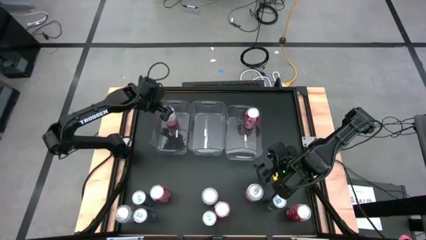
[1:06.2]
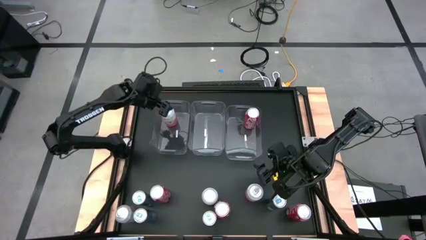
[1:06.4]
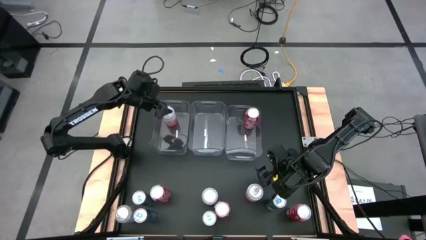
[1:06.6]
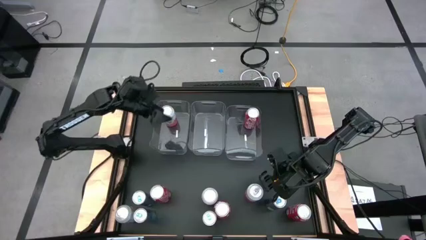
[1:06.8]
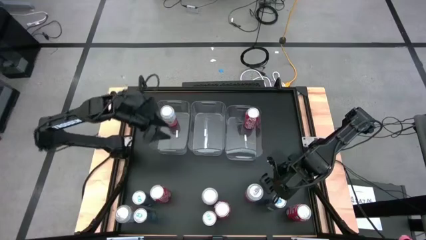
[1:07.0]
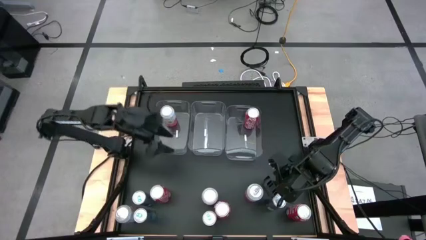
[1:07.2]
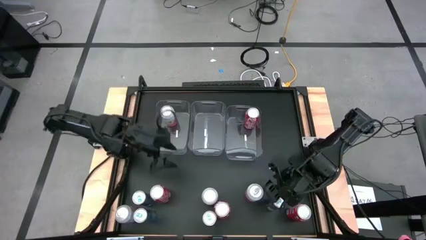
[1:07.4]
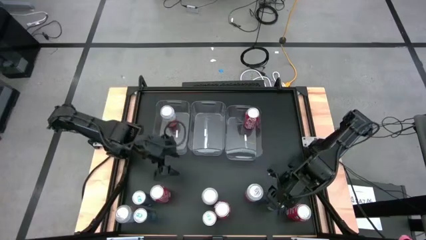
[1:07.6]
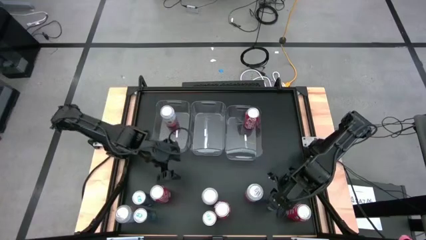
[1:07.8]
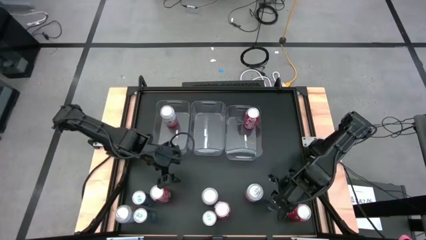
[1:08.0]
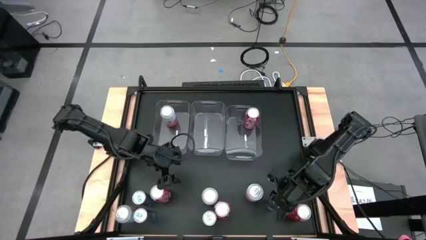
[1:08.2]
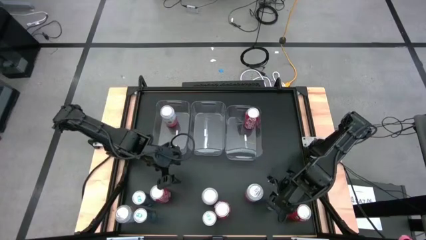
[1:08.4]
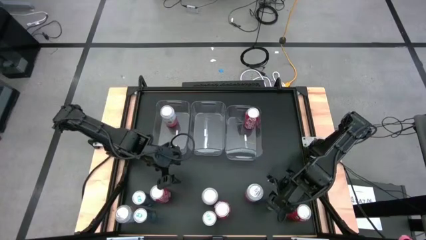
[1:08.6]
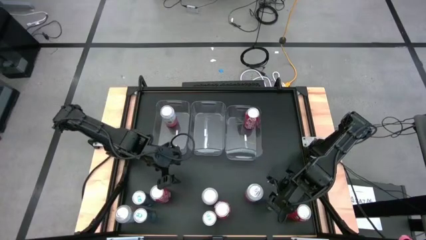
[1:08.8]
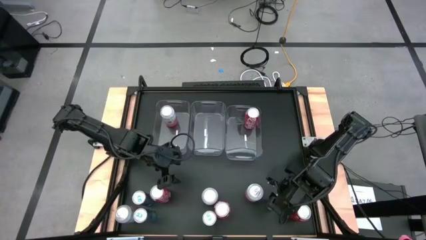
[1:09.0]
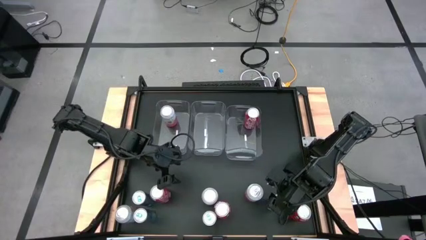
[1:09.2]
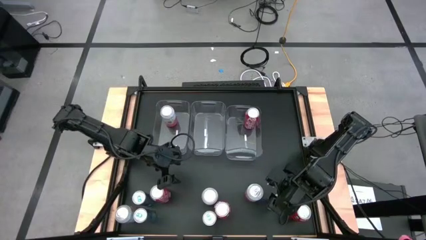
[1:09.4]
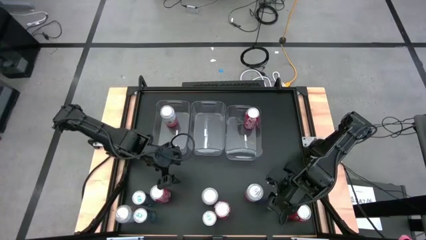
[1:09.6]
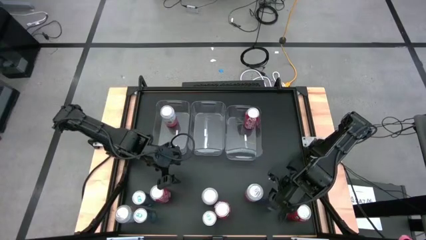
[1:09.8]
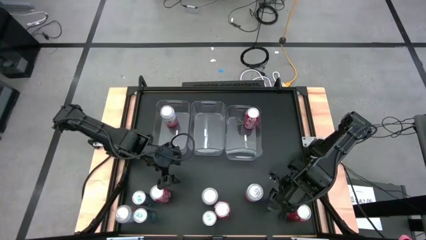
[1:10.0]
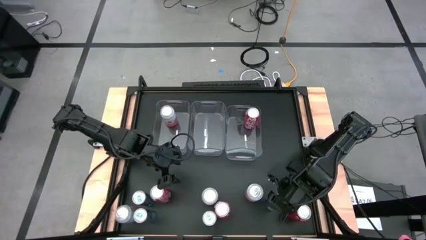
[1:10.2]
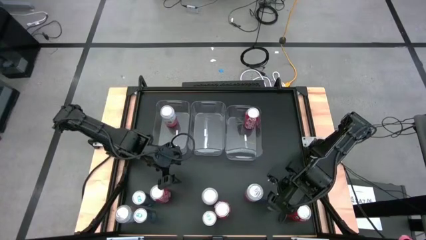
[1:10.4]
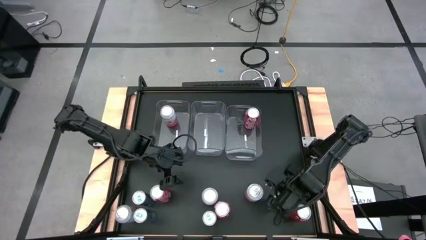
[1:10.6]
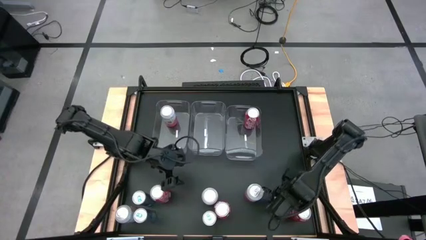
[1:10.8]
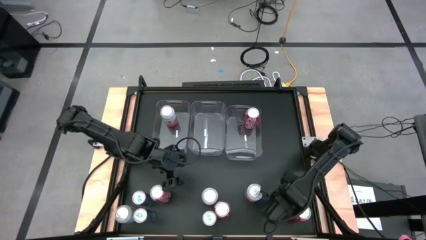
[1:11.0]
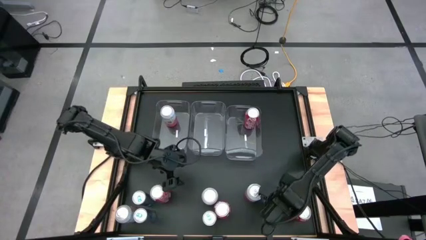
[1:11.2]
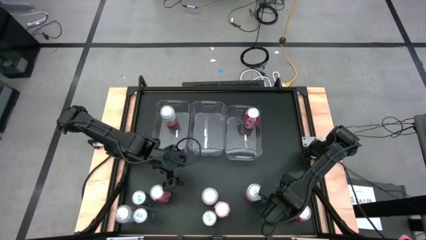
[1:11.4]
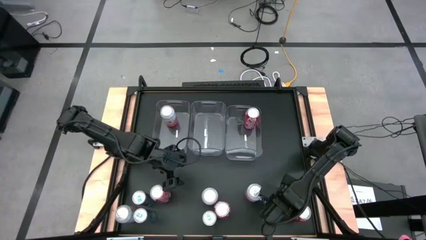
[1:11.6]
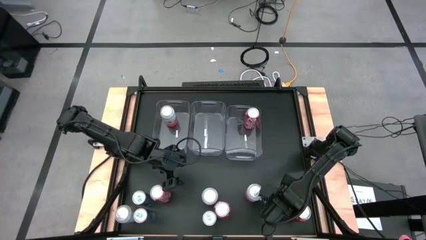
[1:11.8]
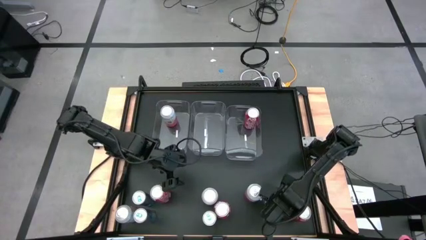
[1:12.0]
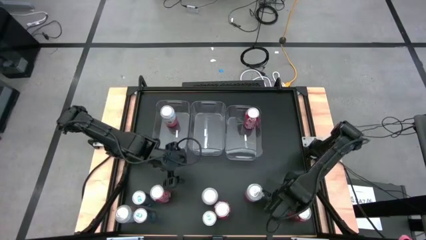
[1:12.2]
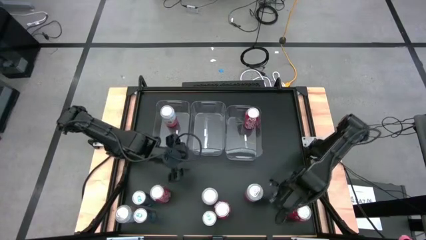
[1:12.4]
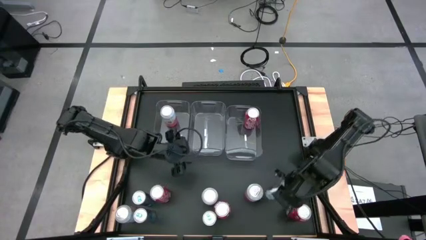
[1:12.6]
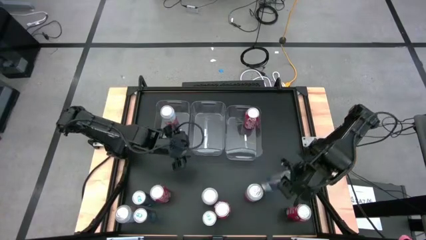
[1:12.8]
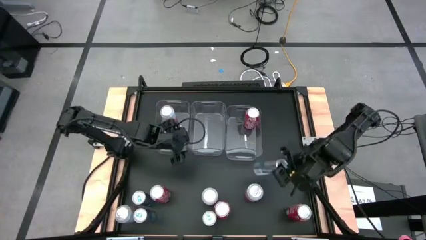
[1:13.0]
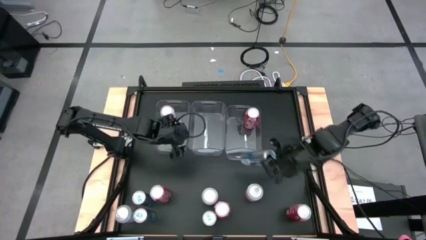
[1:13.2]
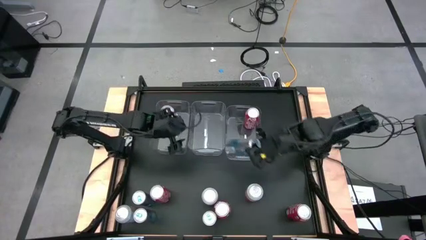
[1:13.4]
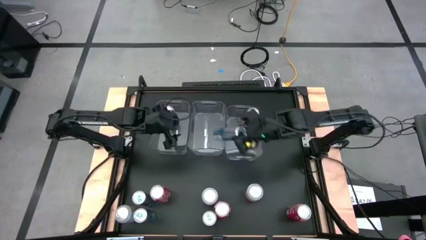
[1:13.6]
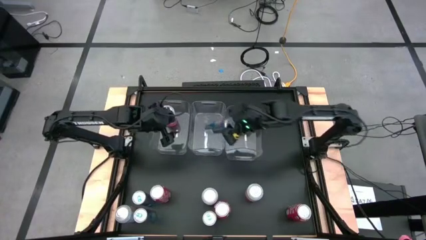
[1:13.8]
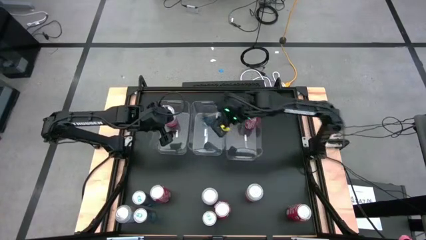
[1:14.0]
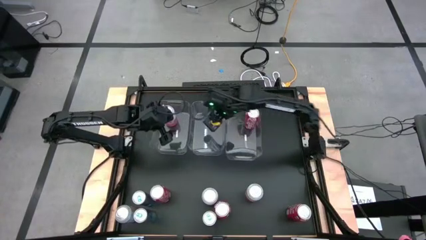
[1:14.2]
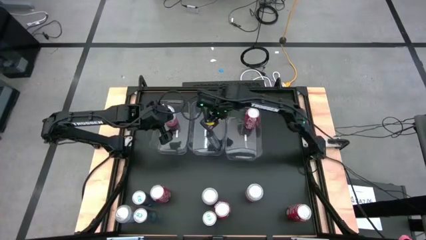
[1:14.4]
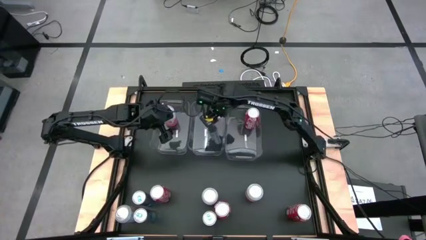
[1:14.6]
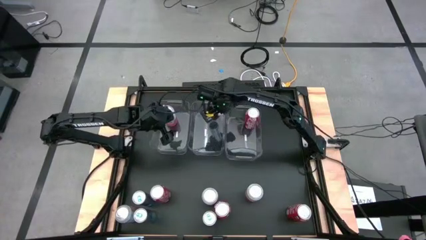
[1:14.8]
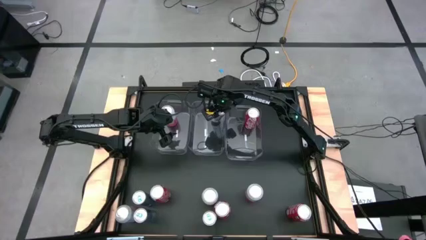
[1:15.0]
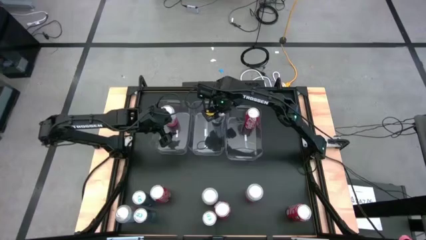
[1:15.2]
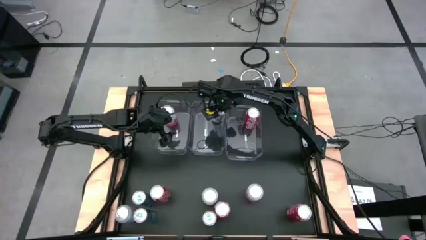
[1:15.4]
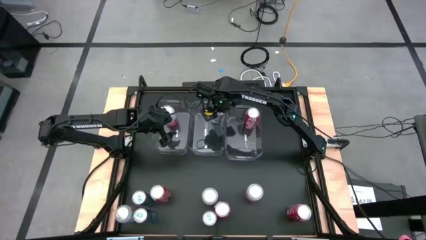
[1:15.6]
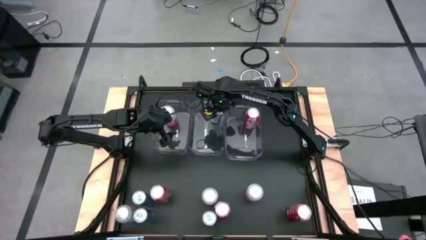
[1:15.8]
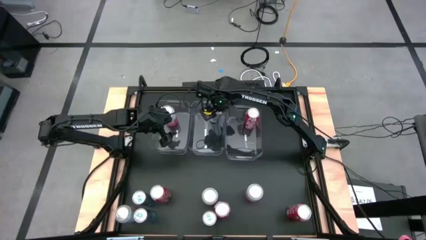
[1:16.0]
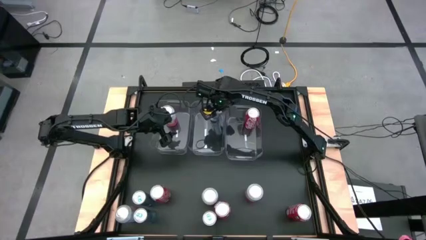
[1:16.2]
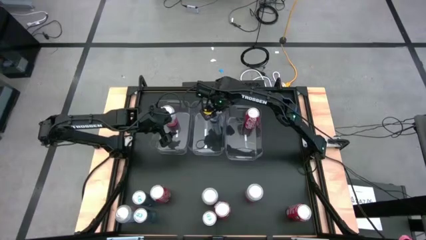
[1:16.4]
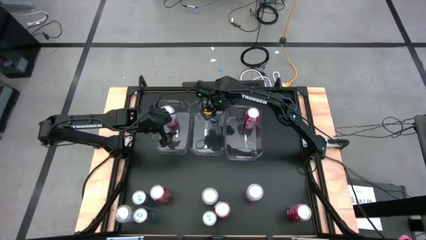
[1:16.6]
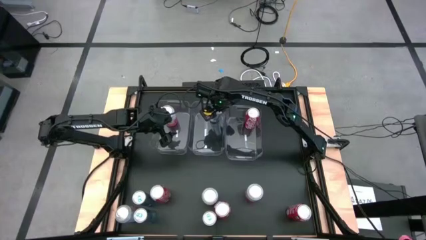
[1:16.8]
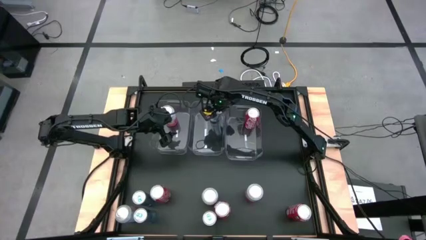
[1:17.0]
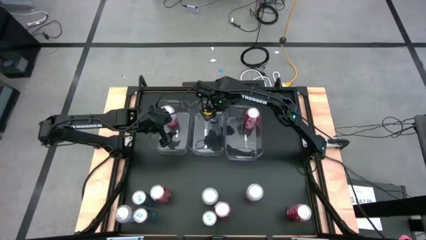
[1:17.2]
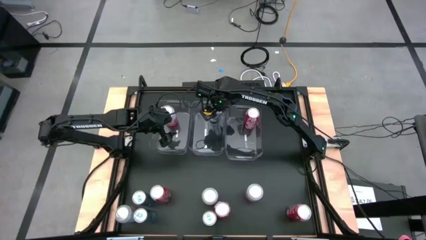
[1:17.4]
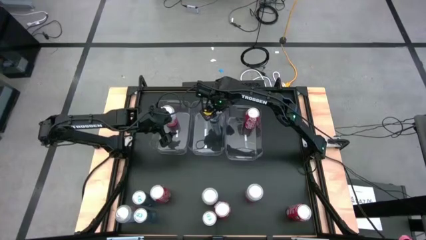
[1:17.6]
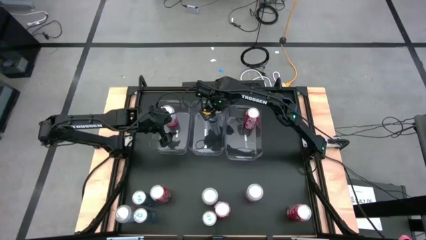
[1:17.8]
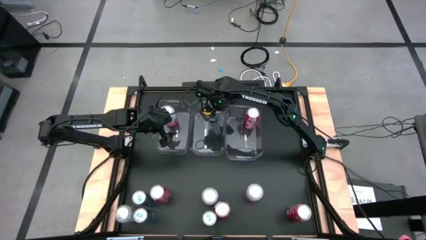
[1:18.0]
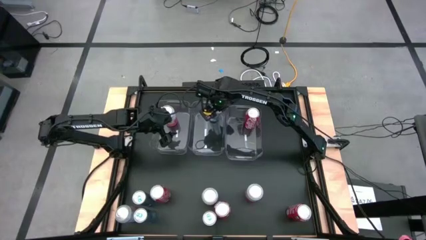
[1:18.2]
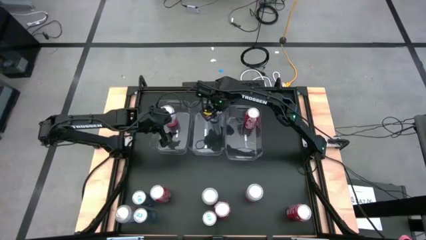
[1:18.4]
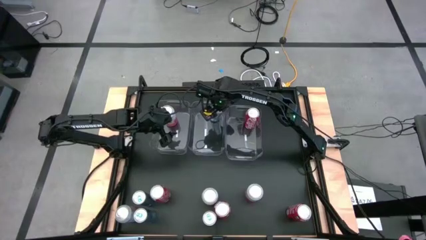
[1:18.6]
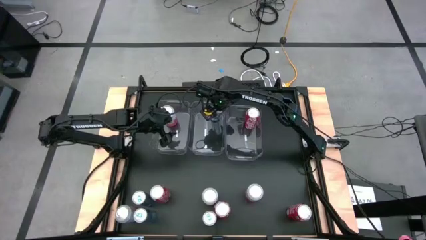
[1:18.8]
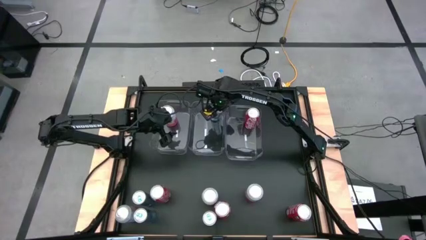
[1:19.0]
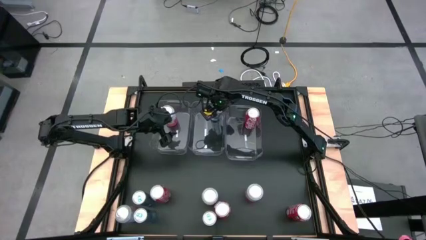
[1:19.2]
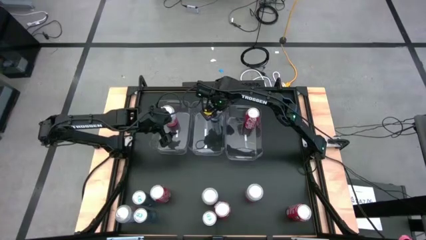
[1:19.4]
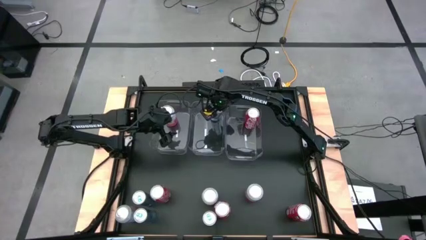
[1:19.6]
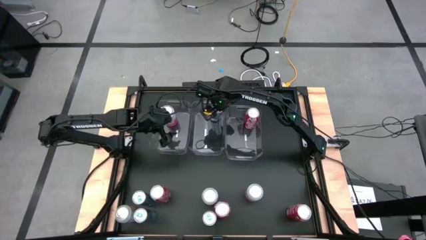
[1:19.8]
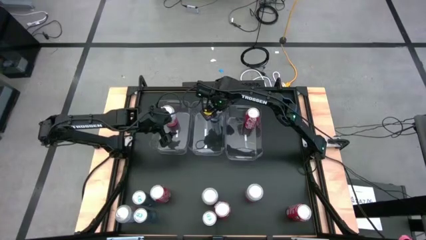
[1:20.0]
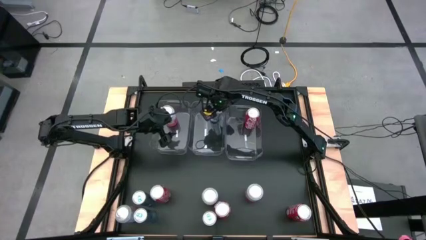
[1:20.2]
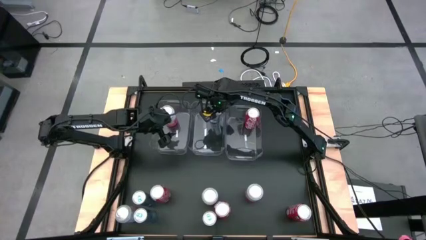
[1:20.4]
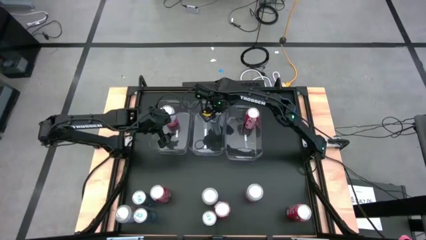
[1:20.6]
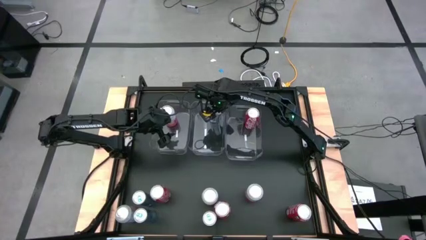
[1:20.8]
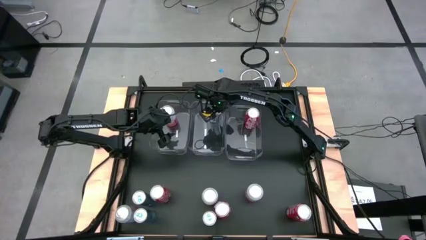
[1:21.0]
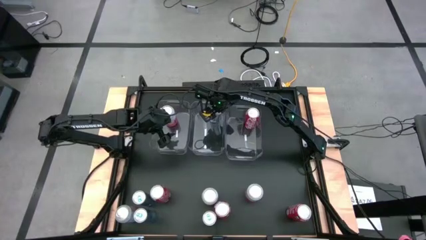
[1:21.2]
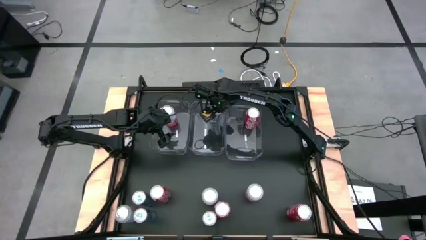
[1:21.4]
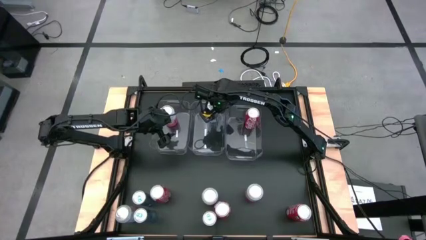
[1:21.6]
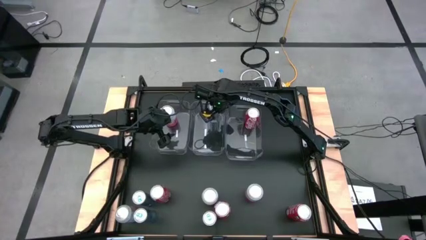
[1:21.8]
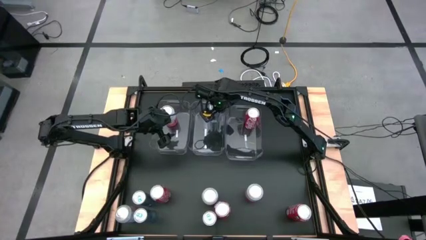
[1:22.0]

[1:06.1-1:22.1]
Task: Sort soda cans
Put the blue soda can into the center transparent bin
